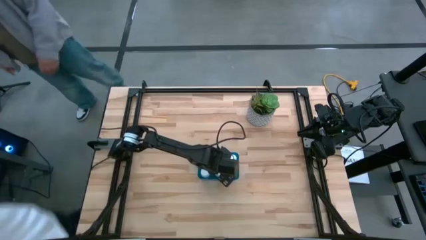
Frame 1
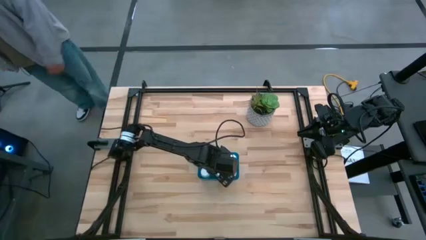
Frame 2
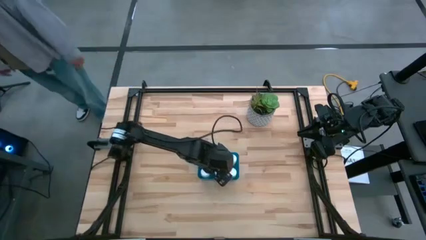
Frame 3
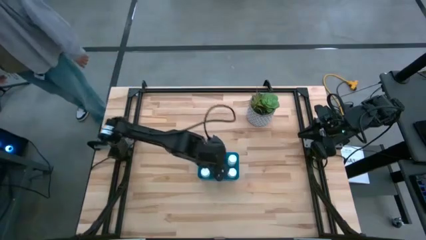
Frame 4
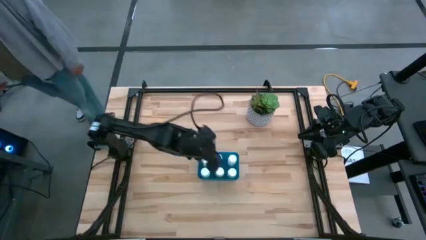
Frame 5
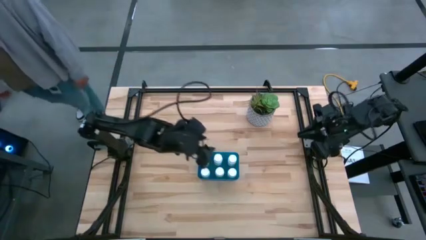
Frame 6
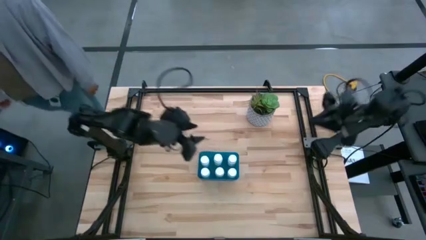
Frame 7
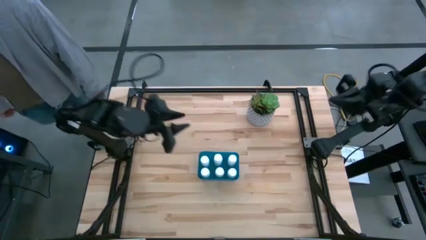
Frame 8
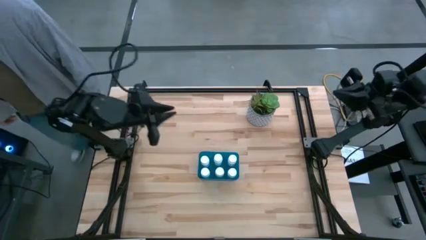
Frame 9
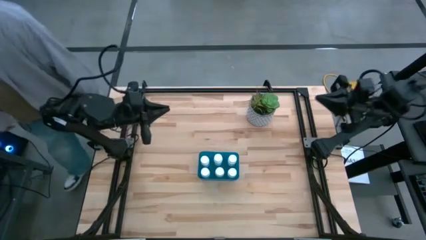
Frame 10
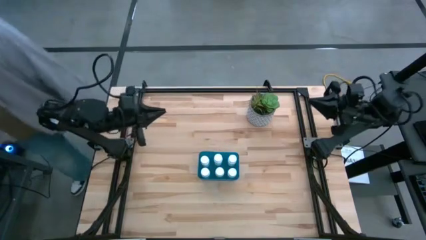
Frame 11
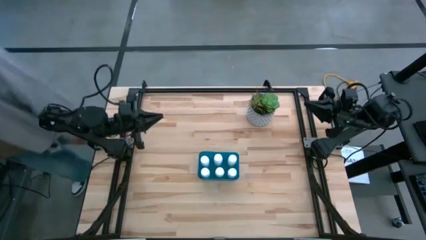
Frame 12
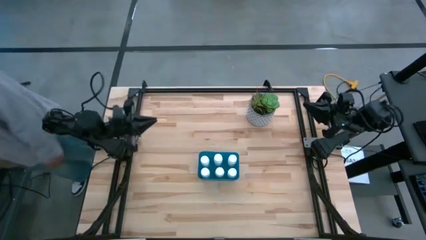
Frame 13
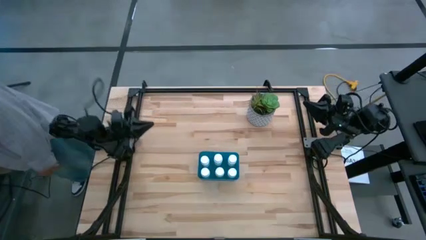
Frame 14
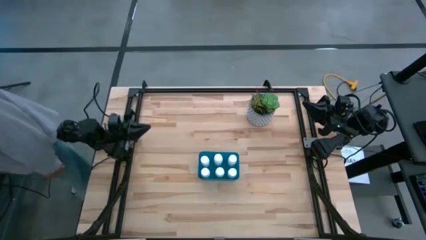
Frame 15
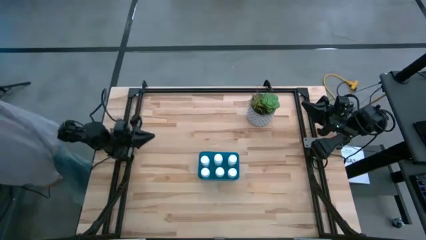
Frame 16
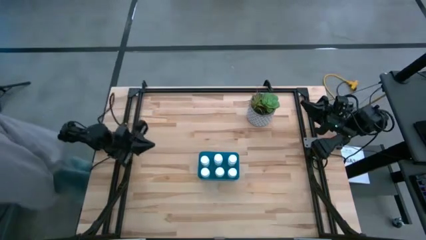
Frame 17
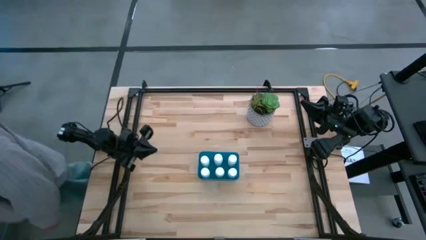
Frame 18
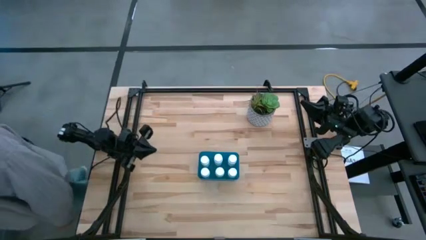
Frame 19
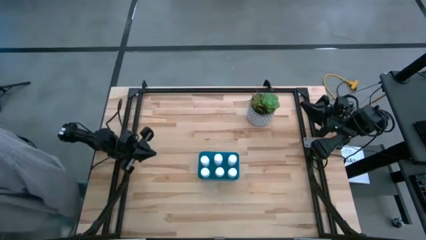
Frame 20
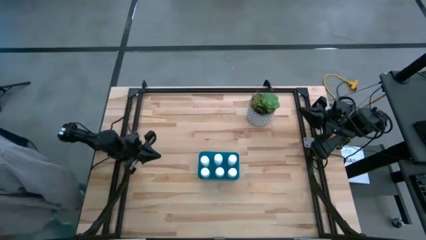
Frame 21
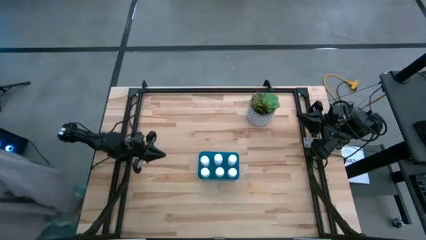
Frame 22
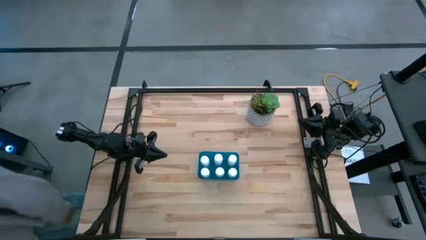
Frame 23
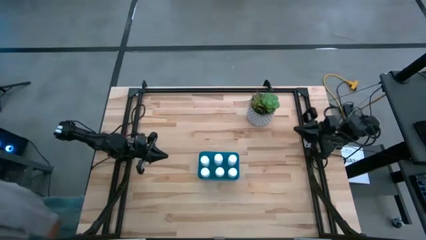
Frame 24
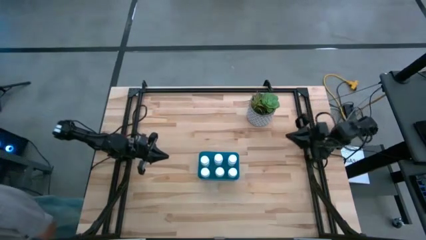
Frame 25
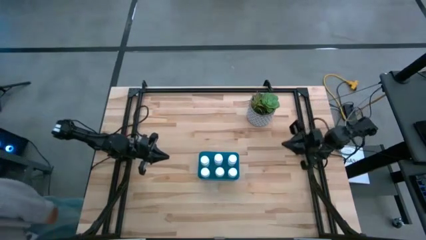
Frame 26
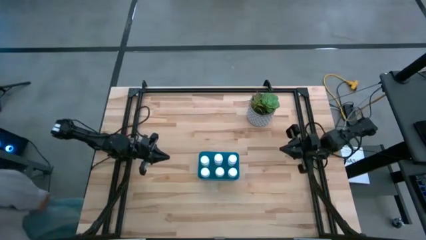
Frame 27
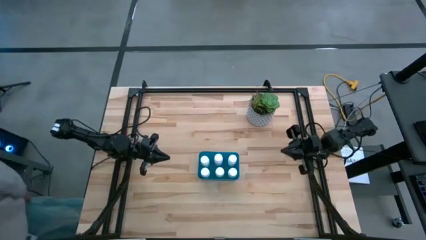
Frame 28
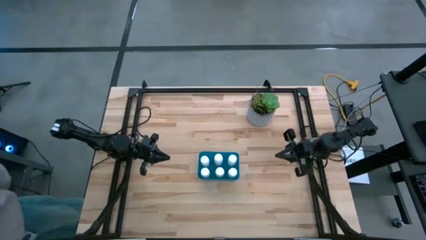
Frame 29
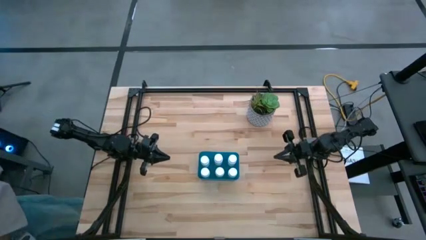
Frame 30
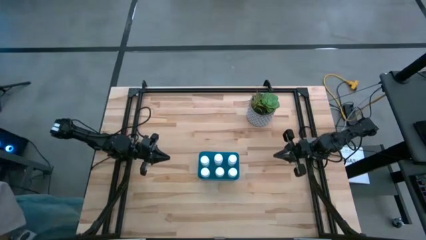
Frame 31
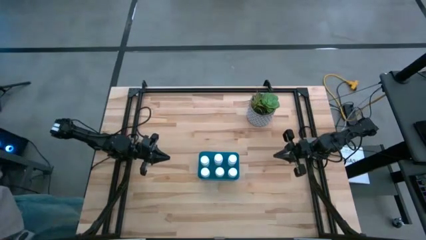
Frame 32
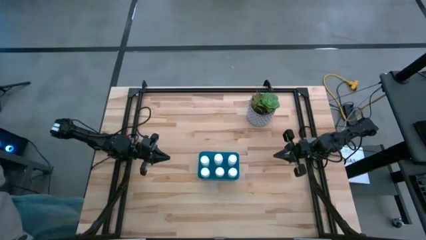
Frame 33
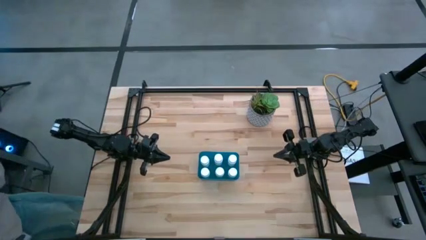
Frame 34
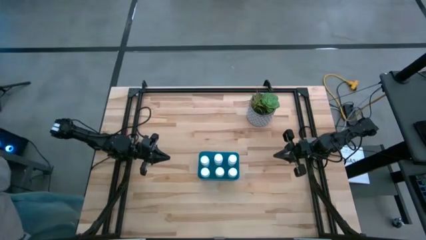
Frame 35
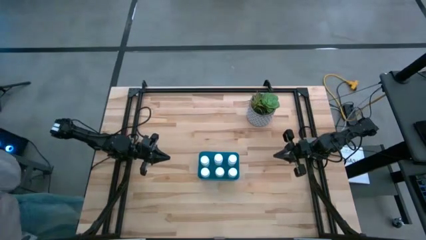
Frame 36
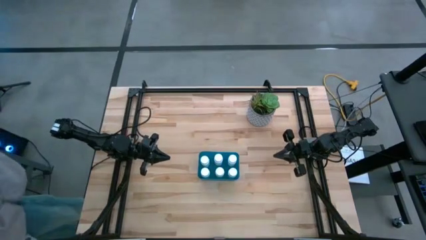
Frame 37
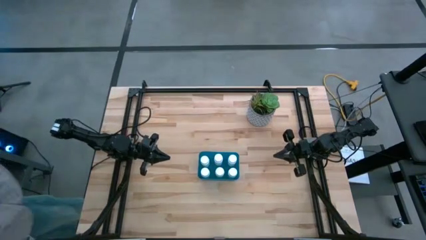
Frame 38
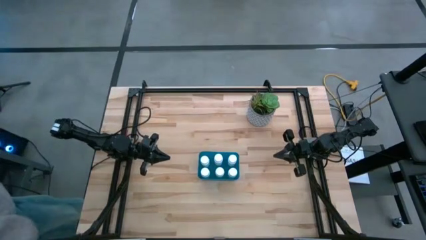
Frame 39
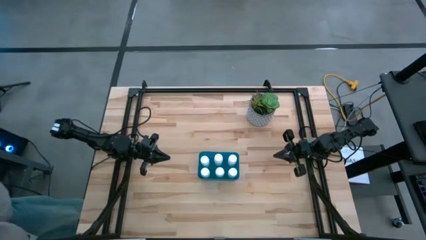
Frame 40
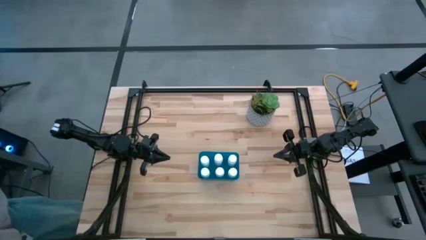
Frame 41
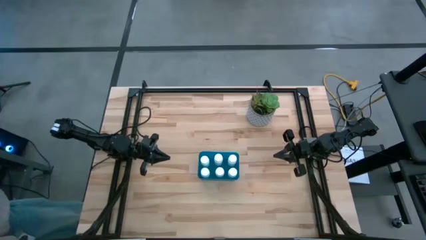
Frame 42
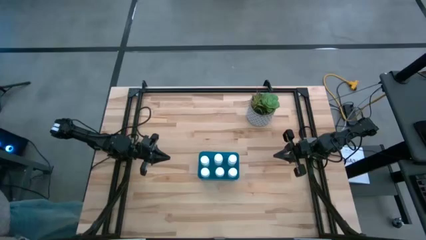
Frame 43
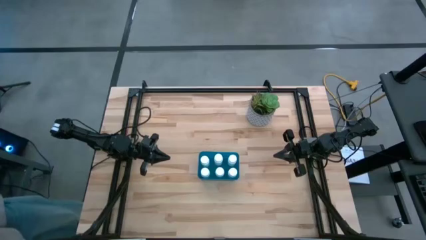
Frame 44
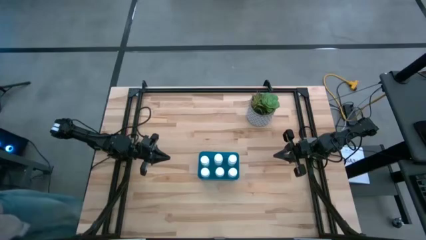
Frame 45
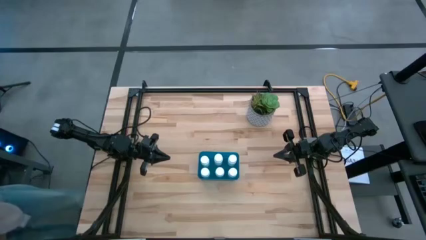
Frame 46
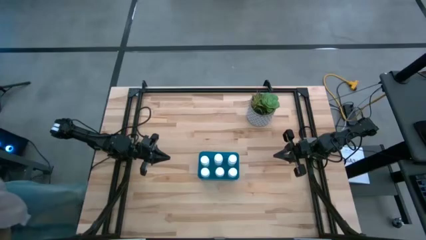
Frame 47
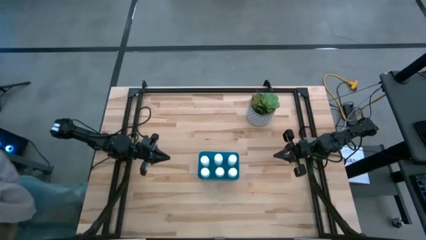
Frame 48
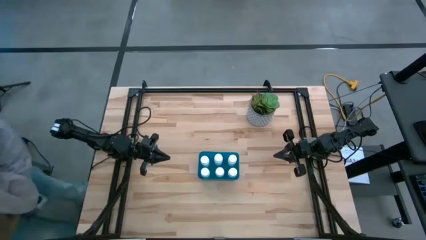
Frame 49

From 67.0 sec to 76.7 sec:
Task: Pick and place pill bottles into a basket
Return to Home Position
